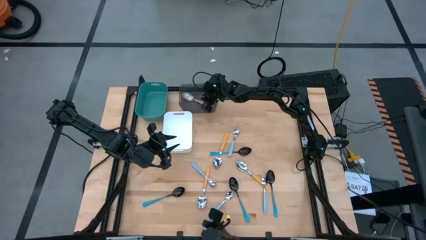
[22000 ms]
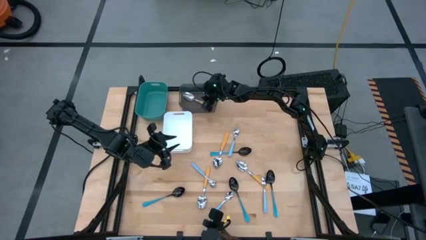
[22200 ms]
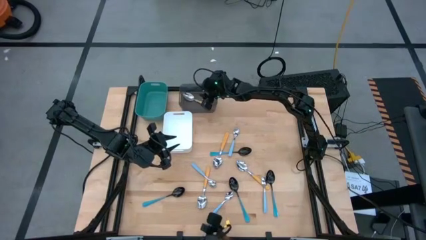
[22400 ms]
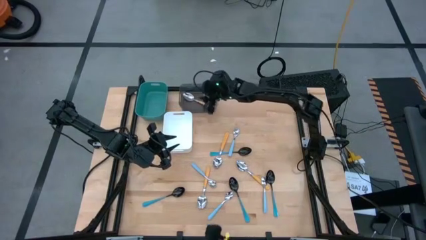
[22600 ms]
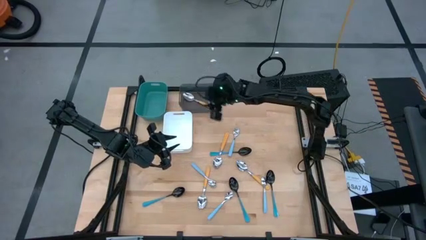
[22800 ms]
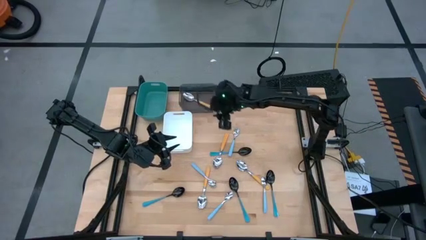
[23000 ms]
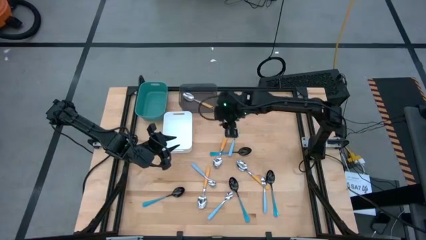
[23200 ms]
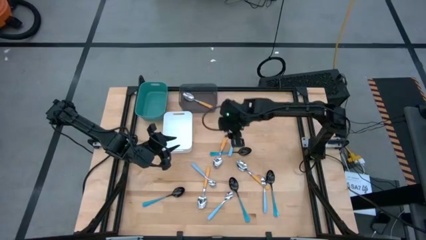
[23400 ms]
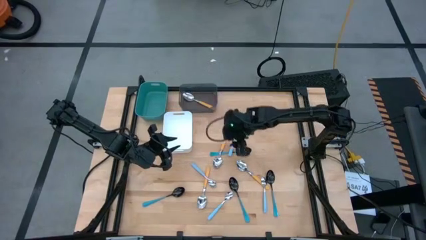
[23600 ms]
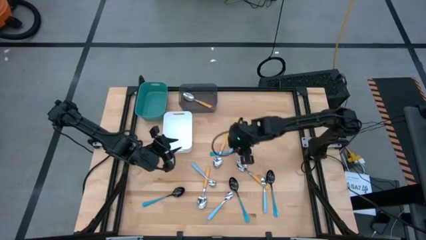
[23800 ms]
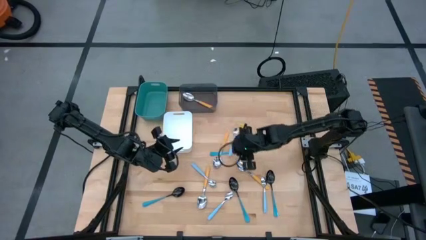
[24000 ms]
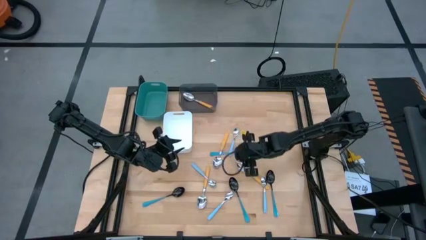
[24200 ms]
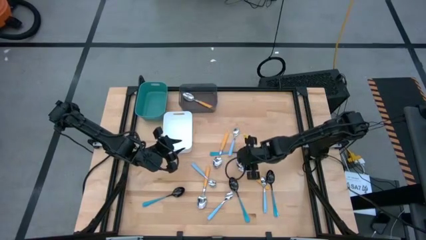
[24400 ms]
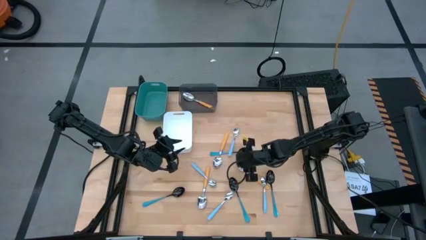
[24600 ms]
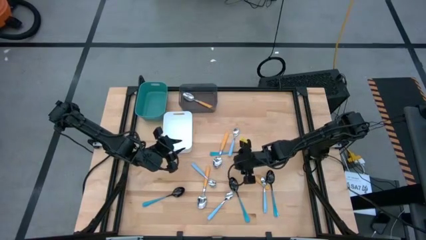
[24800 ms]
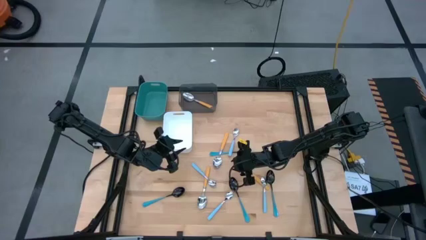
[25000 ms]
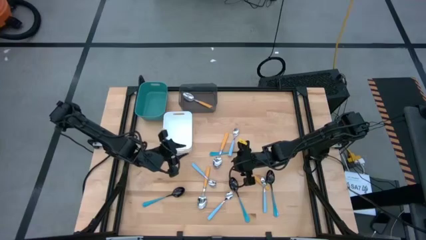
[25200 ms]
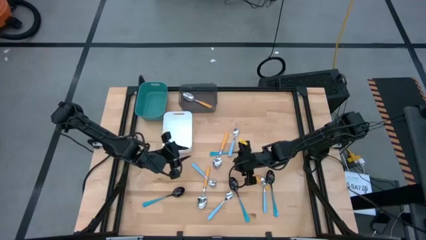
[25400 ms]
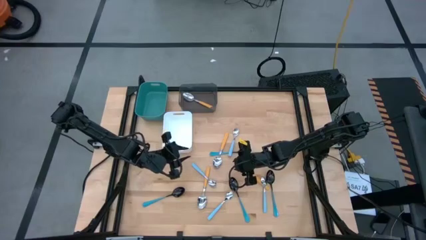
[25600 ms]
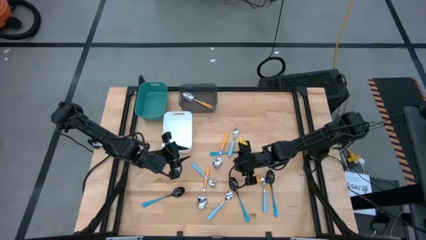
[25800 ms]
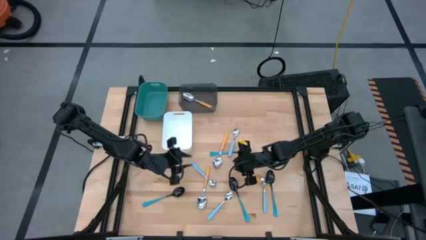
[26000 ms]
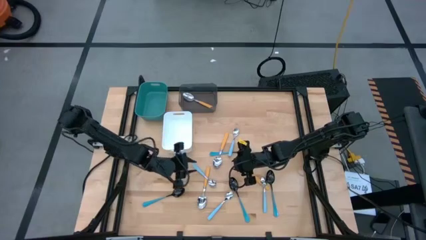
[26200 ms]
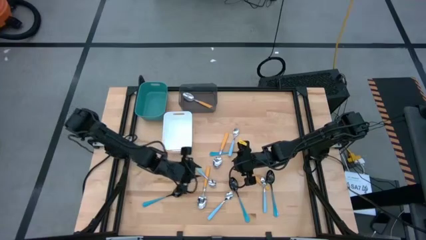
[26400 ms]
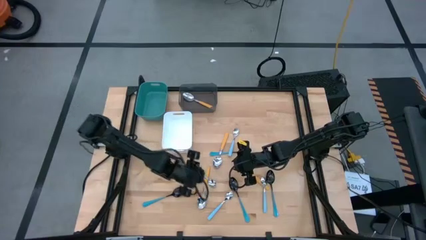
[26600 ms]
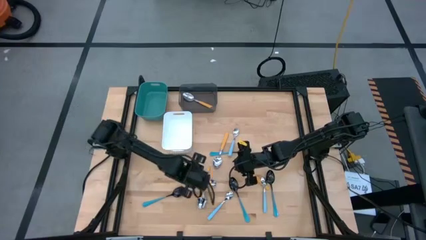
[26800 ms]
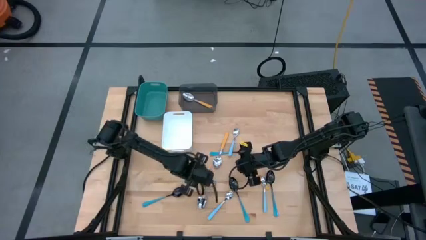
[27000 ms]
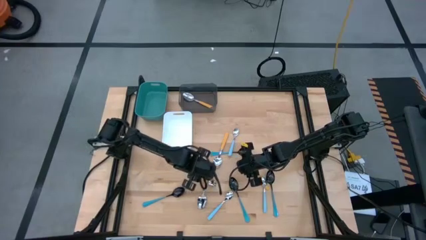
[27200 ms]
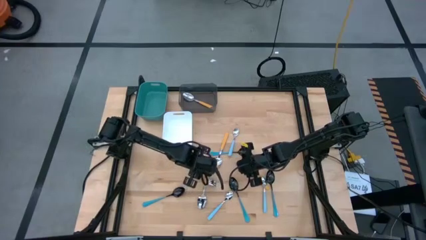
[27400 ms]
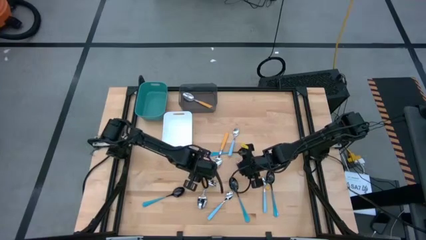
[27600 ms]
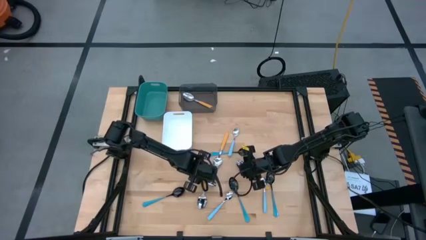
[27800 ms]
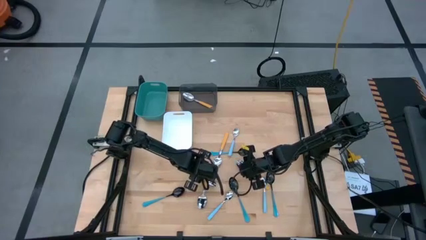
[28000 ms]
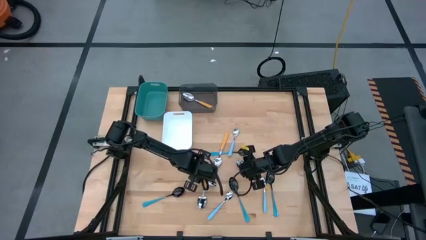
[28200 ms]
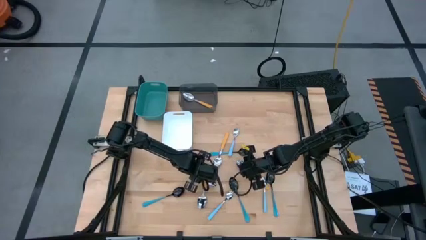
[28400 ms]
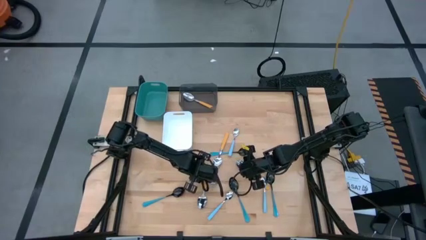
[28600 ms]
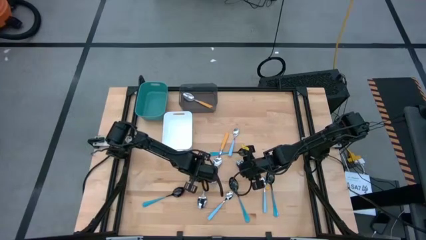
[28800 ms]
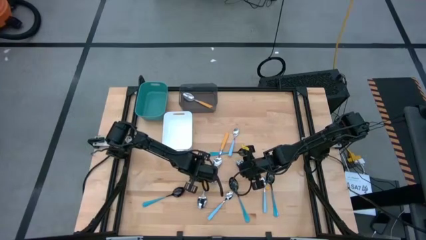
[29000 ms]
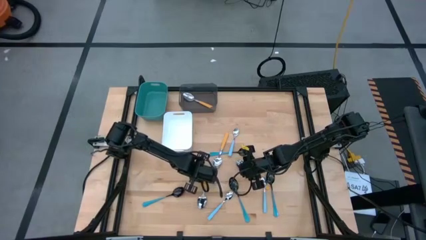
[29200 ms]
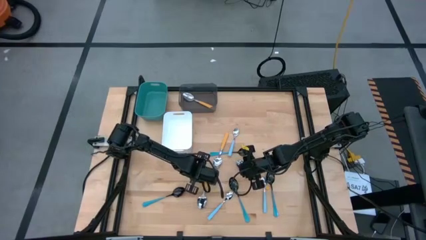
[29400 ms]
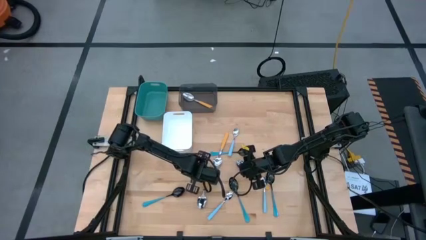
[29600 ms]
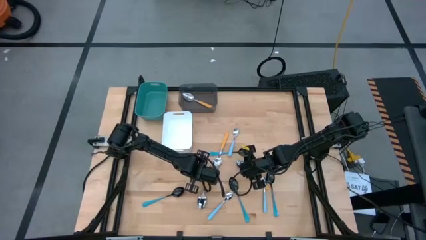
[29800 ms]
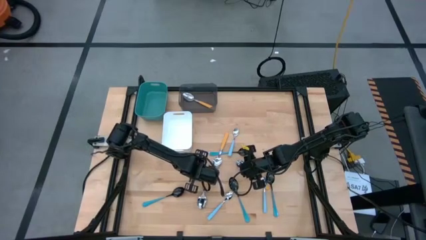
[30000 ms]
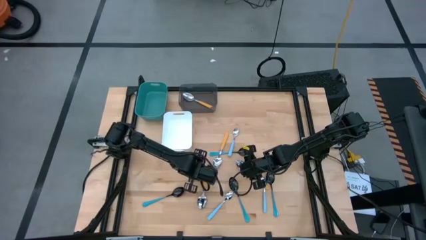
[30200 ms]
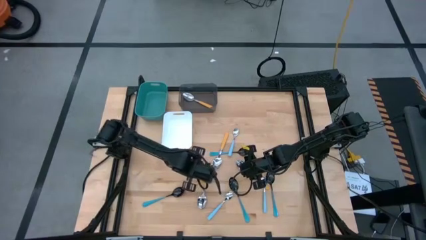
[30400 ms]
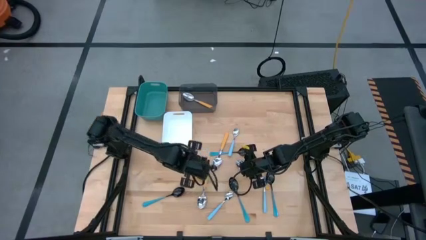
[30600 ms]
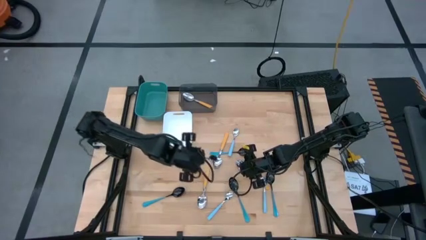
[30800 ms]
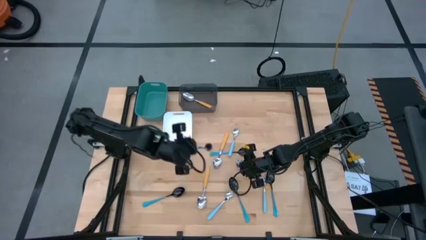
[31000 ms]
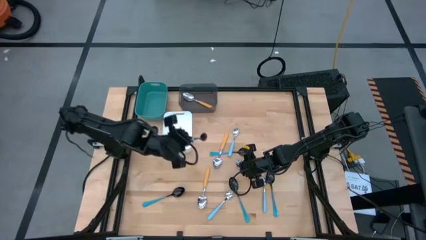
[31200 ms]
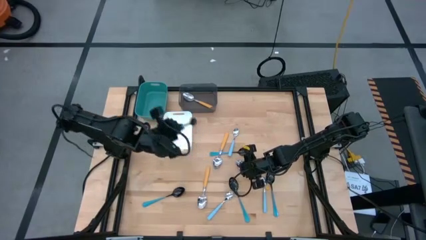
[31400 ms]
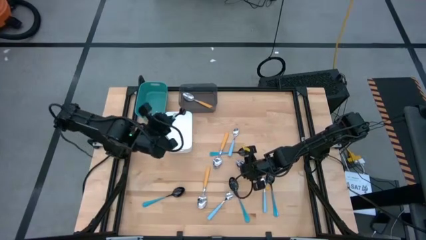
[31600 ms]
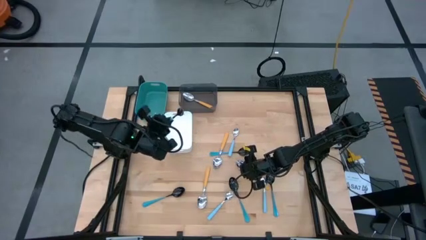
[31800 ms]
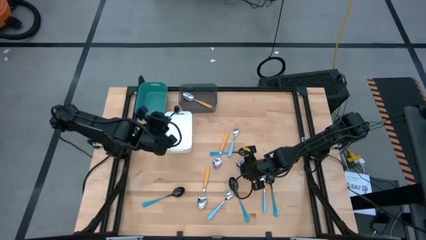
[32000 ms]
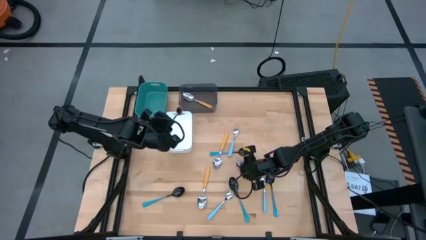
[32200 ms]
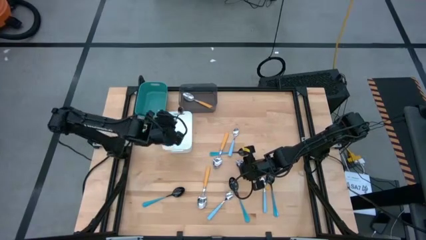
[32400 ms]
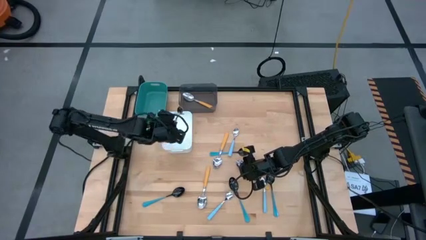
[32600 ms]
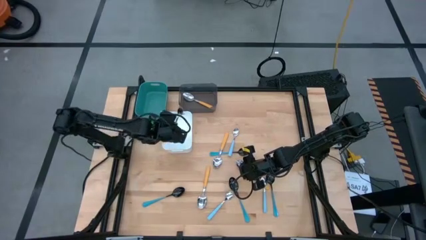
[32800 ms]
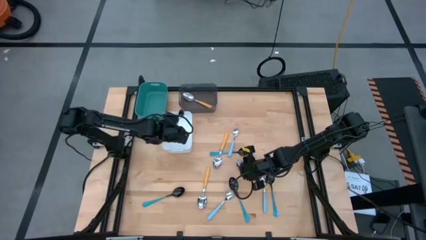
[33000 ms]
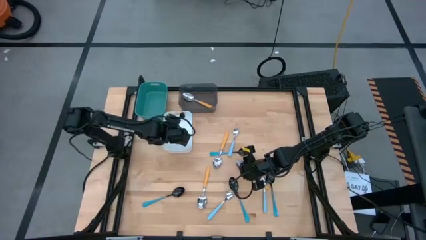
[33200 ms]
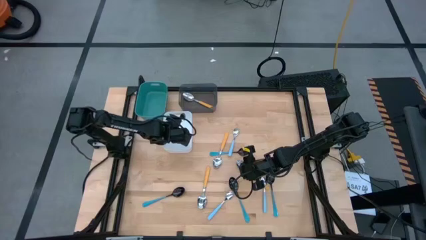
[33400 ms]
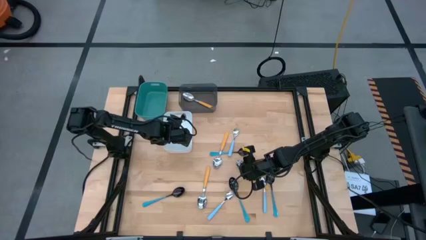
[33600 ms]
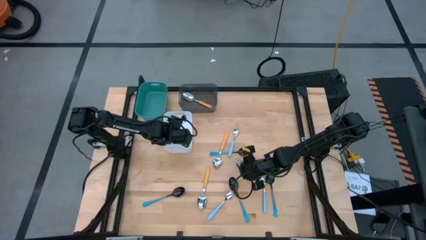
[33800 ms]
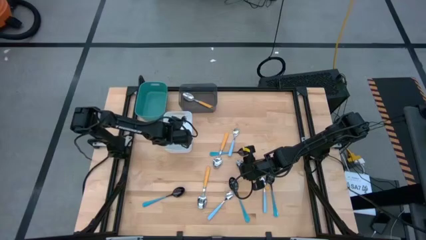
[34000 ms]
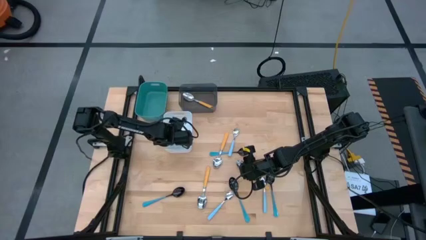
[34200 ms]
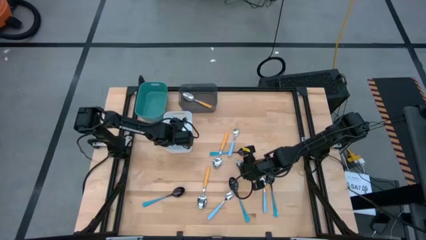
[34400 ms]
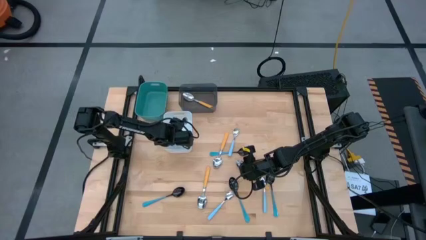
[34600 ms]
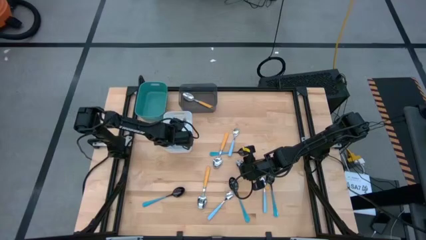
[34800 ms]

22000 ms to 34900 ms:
Task: Sort silverware by color (type)
Put the middle left light blue spoon into the white bin

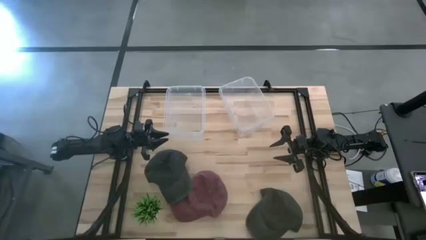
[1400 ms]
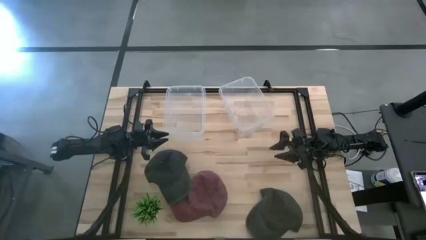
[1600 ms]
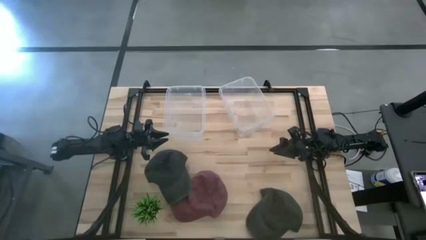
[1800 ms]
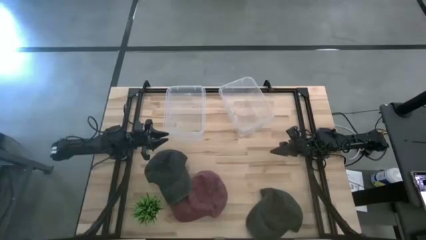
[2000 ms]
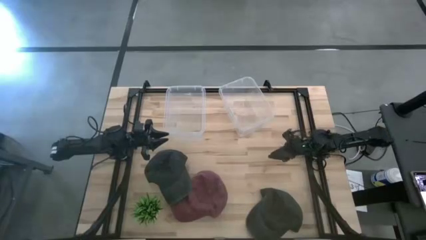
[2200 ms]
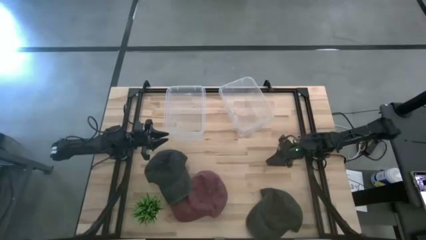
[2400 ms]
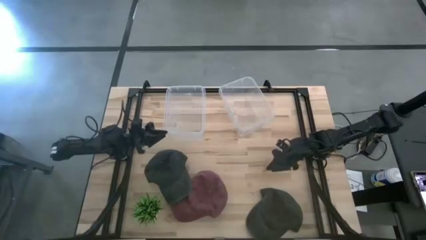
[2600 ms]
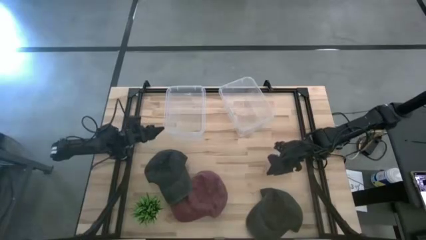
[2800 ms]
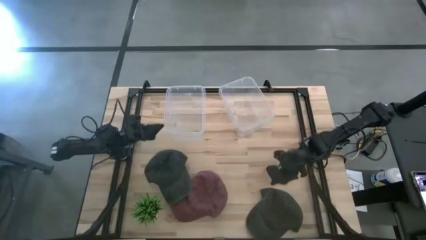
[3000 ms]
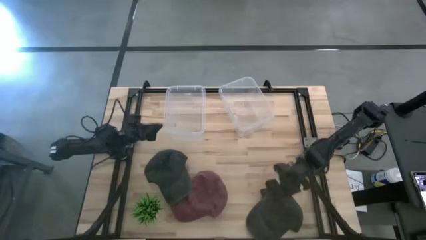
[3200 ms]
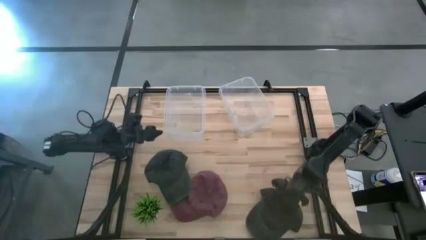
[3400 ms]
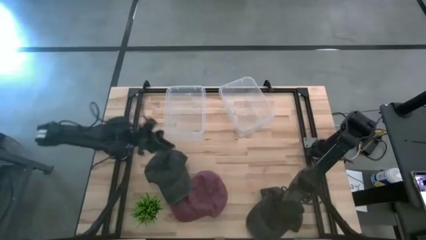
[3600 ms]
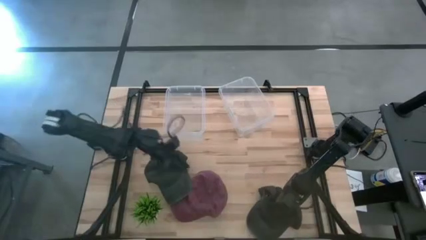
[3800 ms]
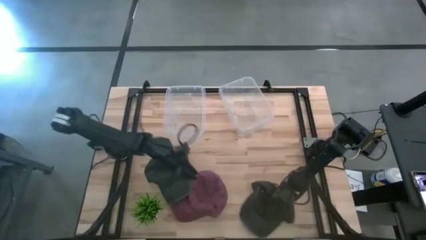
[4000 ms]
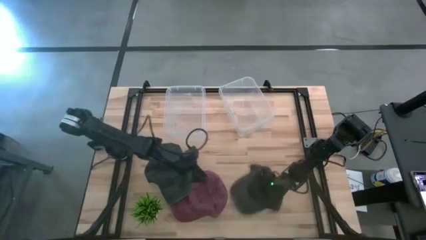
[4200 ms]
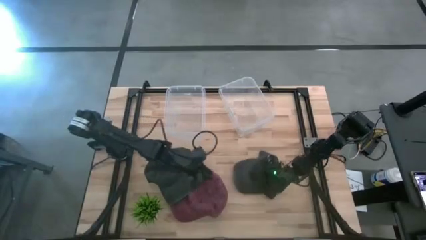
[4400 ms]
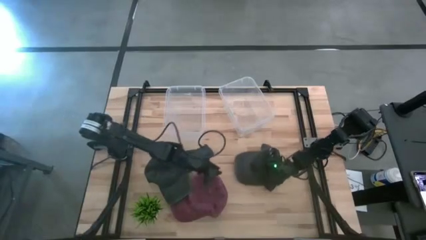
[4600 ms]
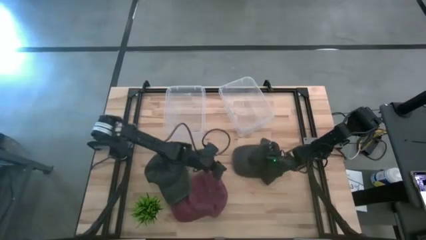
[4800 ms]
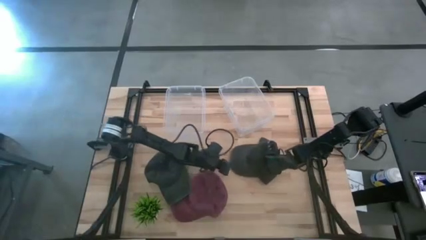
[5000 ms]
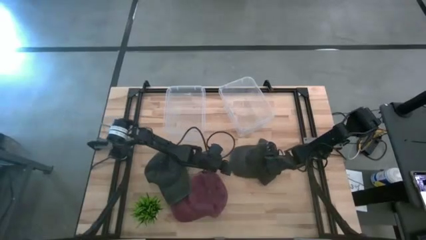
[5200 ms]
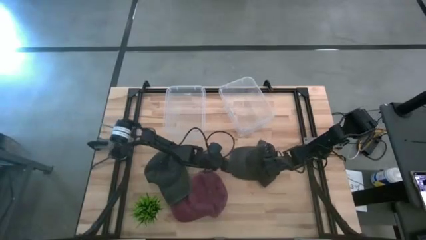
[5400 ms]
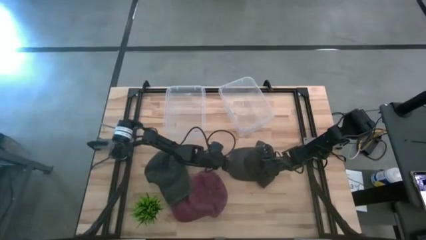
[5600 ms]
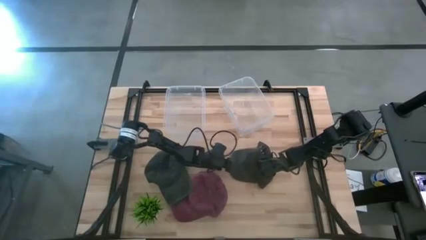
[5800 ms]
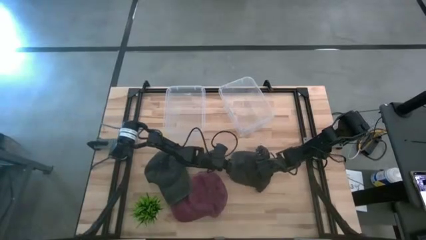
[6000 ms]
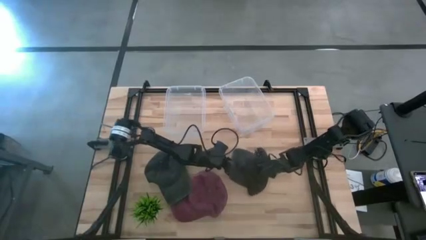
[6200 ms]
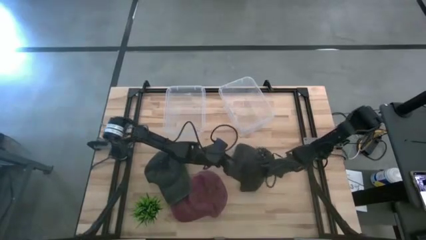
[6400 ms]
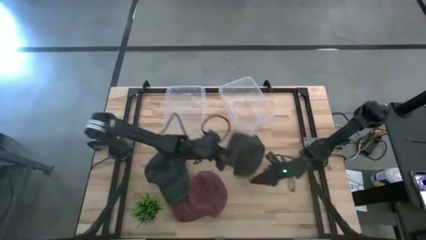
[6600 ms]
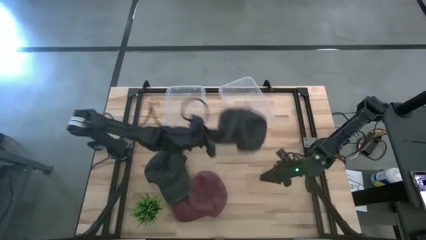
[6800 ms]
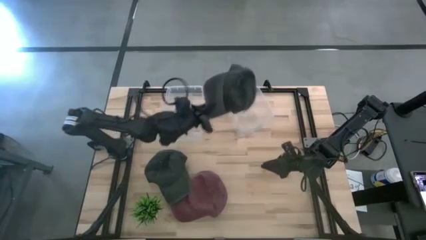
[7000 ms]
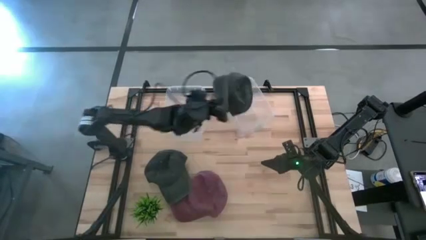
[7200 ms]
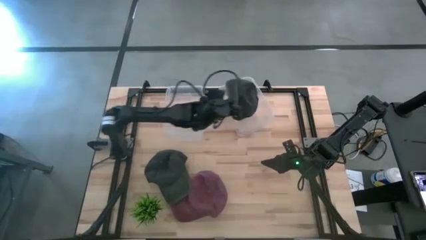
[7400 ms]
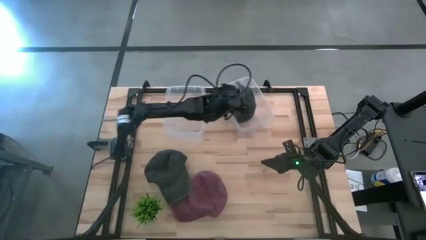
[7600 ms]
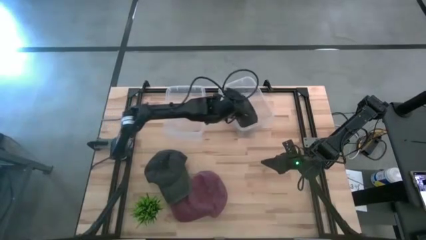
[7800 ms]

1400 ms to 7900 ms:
Task: Pick & Place hat
Put the right black cap into the right transparent bin
